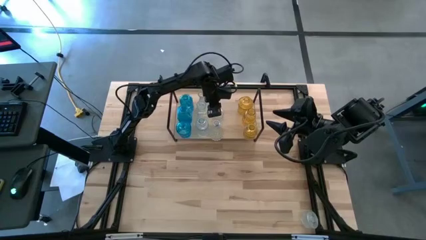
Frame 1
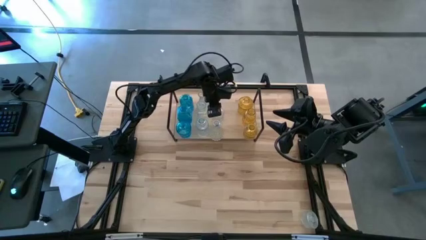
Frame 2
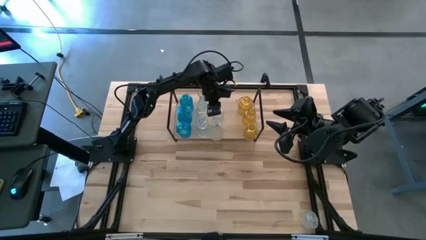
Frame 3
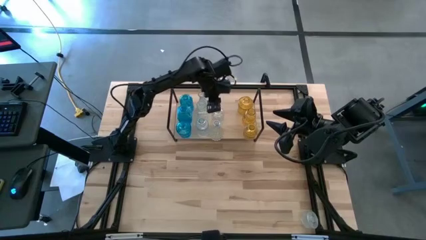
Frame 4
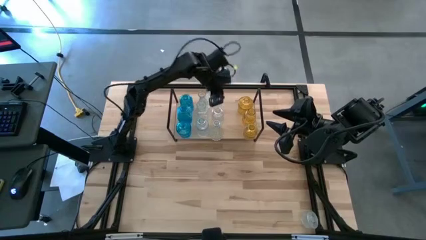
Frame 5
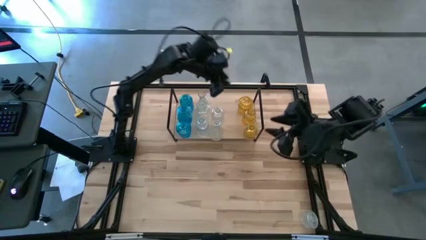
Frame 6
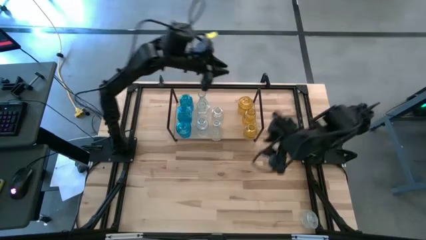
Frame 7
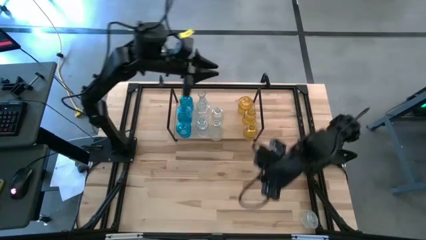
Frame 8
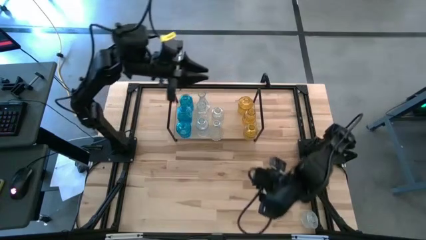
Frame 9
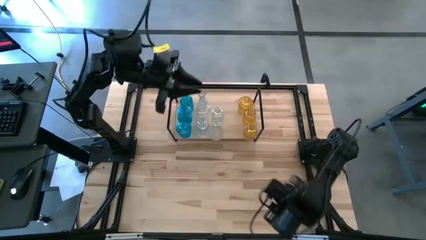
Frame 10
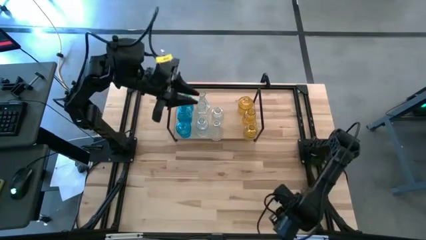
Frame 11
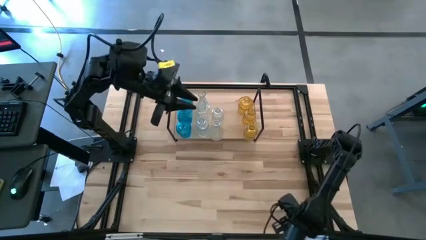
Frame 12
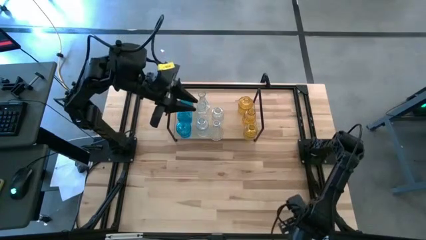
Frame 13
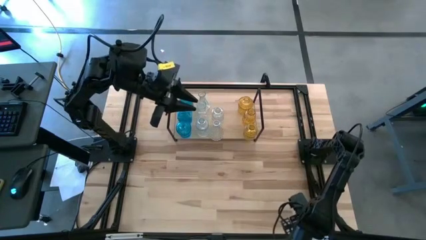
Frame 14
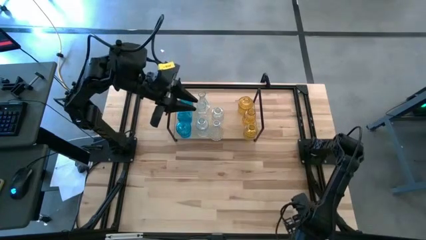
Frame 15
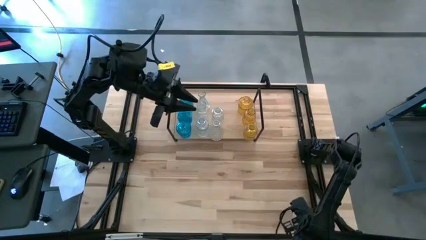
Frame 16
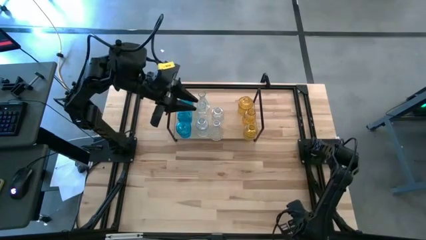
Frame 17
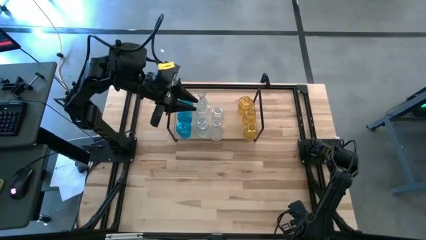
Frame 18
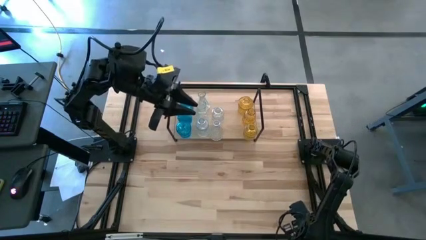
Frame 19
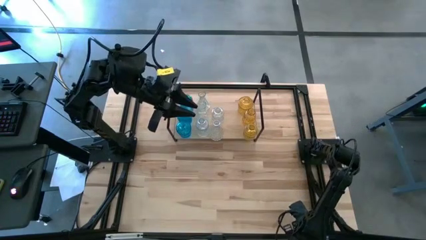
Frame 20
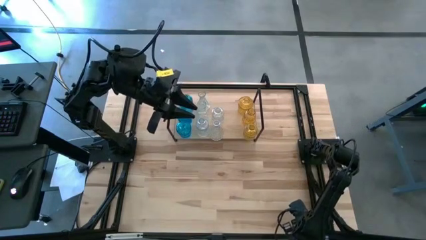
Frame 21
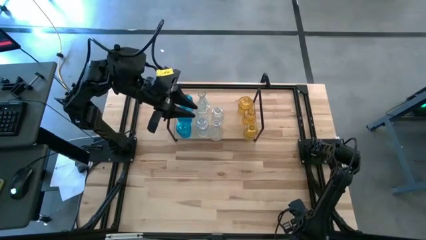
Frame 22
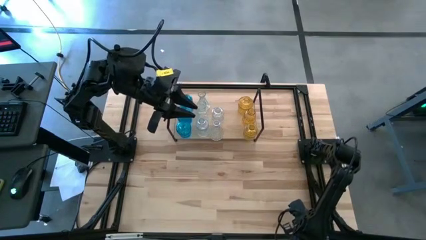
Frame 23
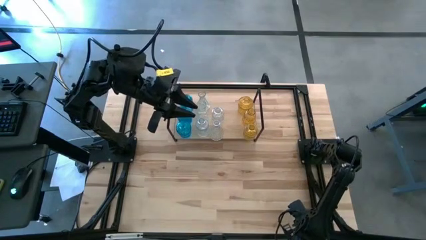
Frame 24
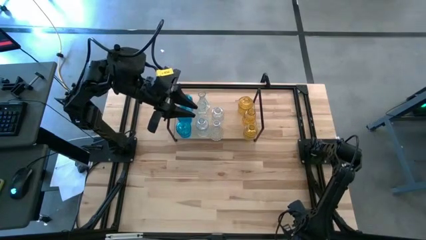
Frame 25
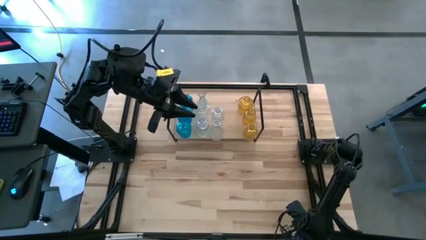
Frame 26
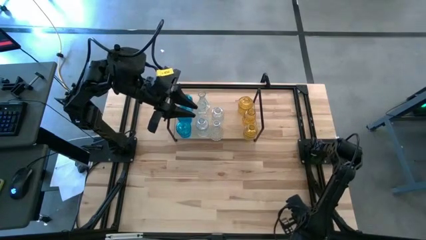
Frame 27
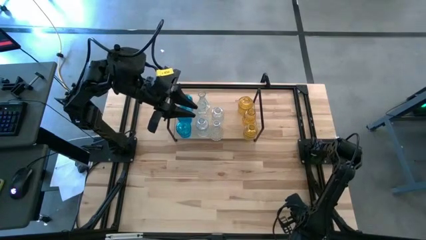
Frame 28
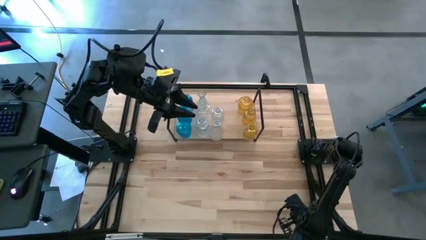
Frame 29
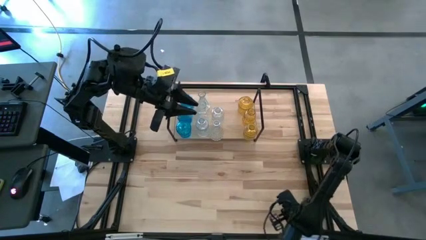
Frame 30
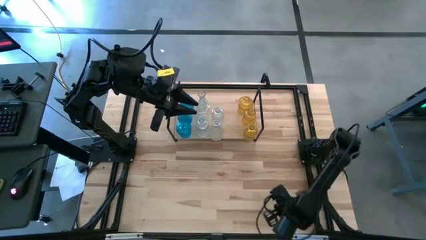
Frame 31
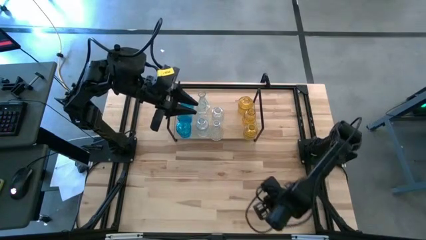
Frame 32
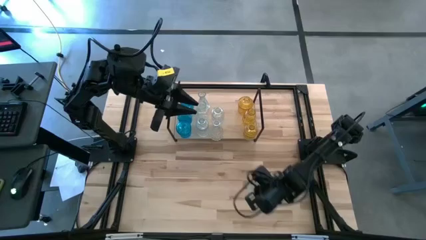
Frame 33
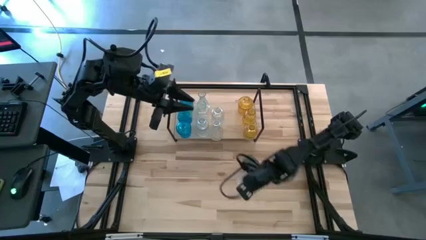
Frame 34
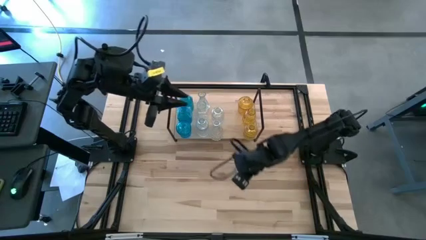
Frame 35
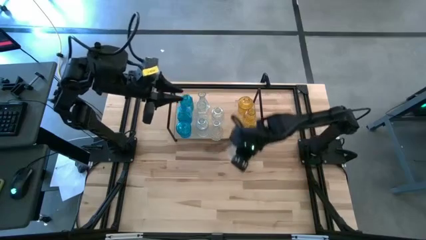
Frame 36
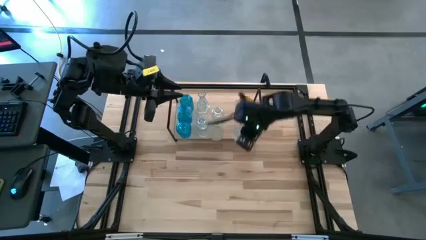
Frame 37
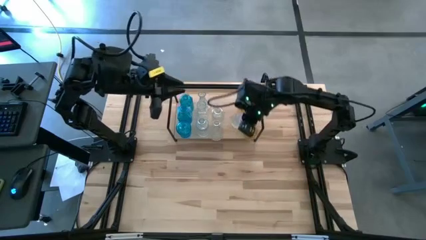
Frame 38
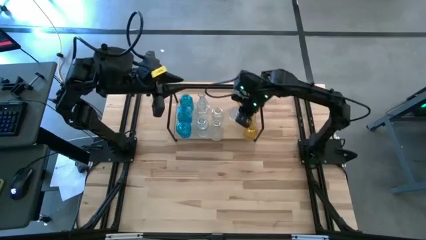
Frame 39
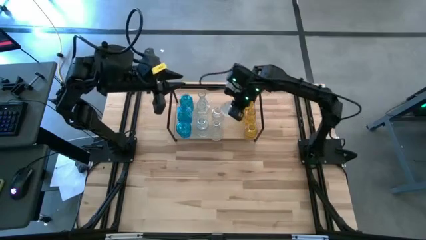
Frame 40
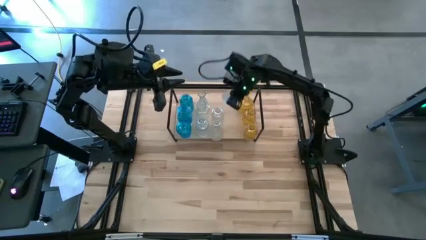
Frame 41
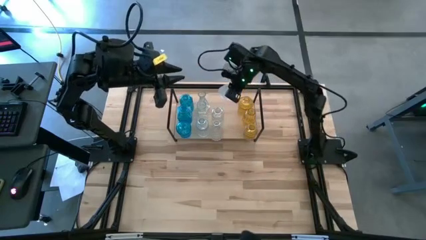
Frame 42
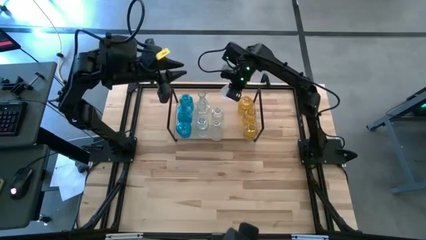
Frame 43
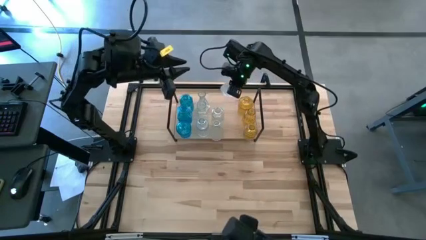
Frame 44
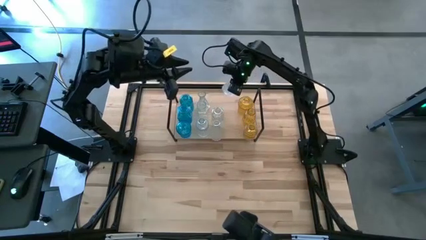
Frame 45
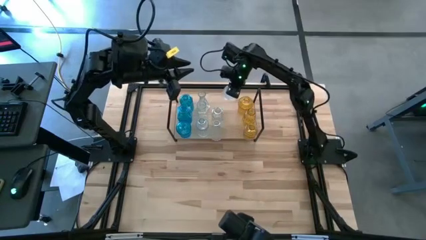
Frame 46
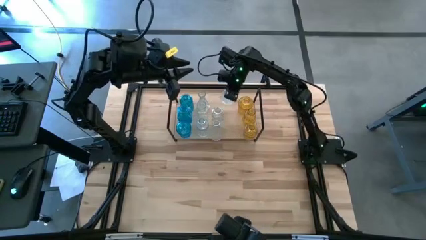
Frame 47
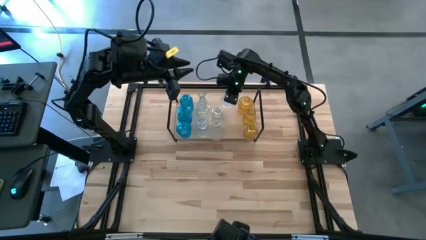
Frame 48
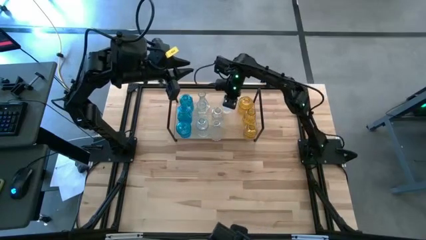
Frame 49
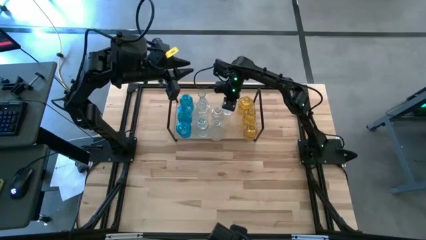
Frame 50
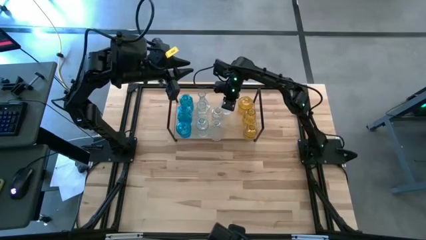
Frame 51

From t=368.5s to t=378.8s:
Task: sort vases onto shelf
Put the transparent vase on the shelf aligned with the other transparent vases

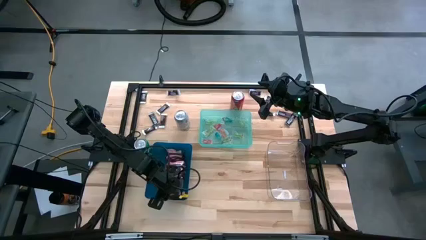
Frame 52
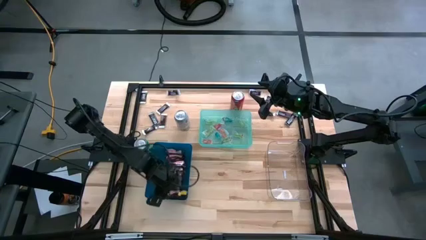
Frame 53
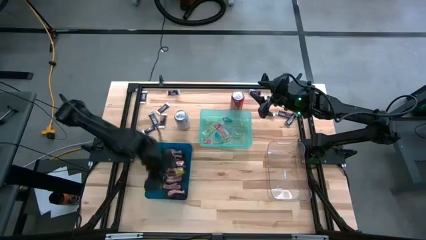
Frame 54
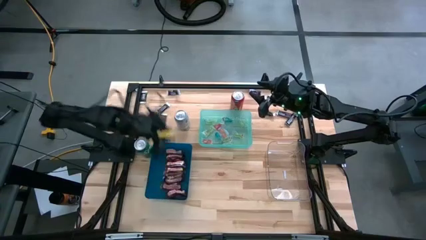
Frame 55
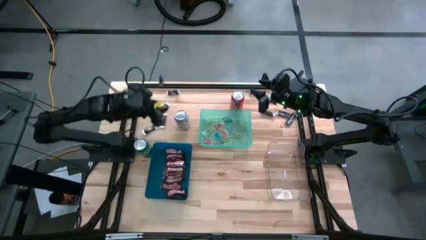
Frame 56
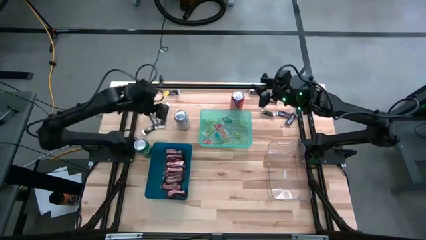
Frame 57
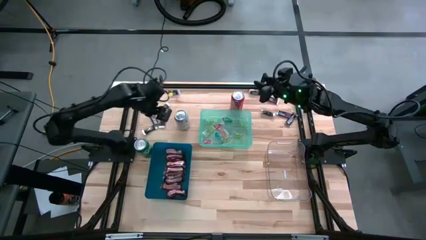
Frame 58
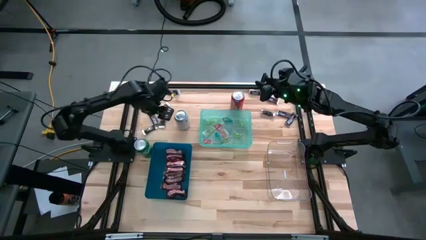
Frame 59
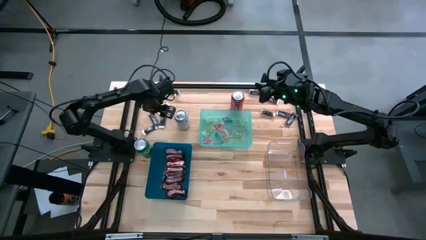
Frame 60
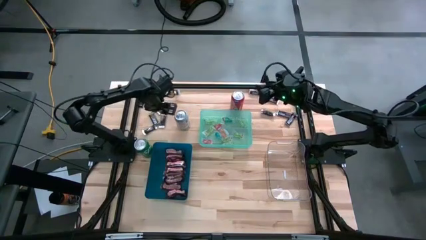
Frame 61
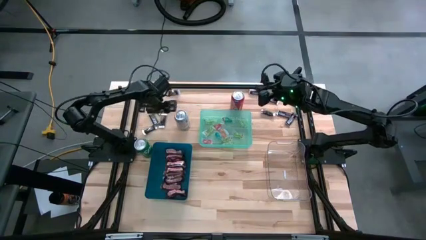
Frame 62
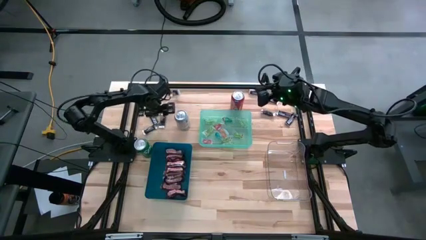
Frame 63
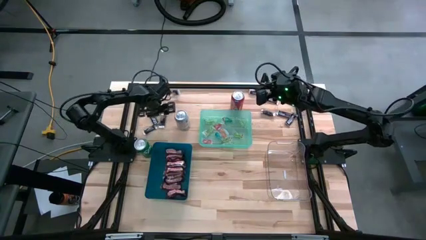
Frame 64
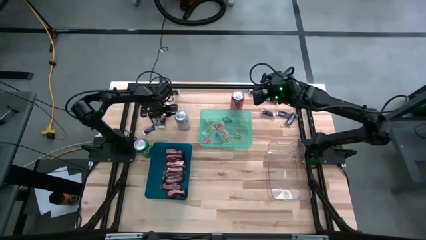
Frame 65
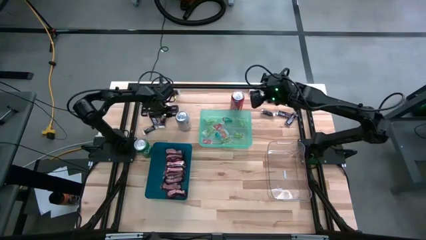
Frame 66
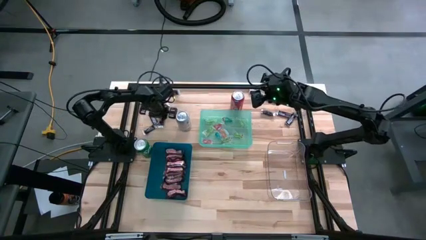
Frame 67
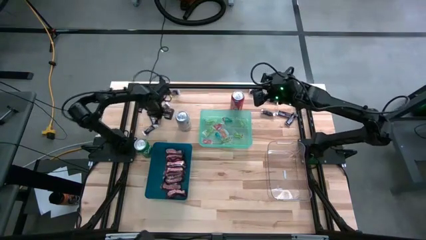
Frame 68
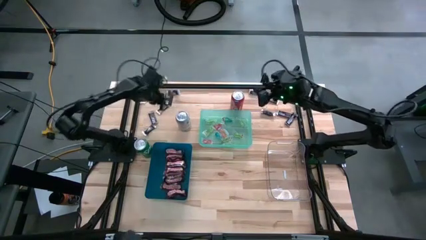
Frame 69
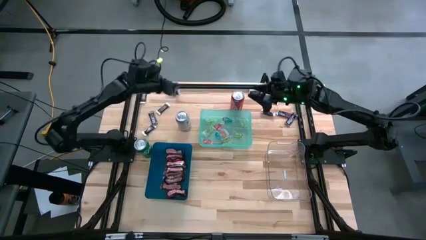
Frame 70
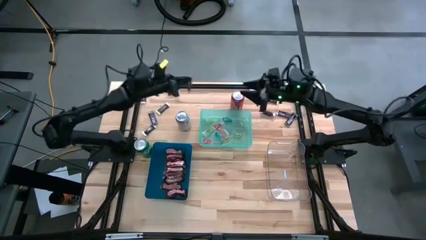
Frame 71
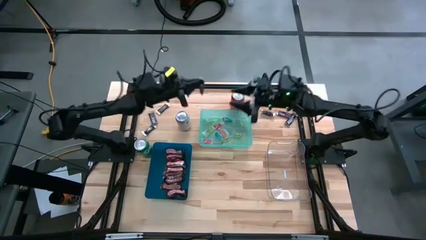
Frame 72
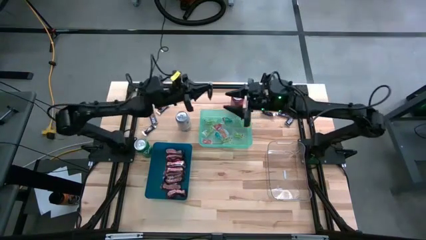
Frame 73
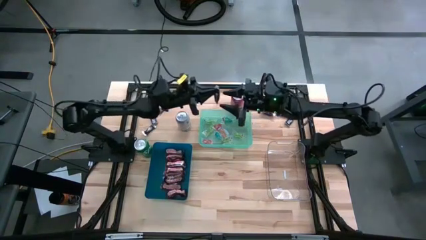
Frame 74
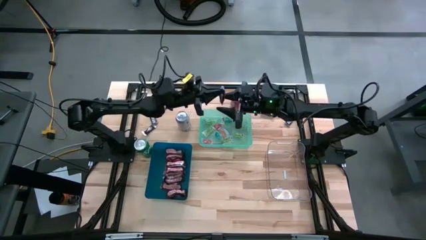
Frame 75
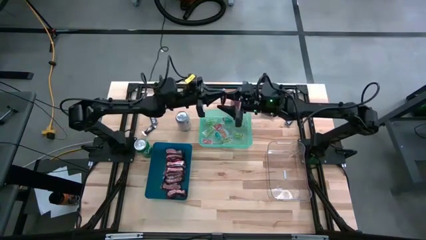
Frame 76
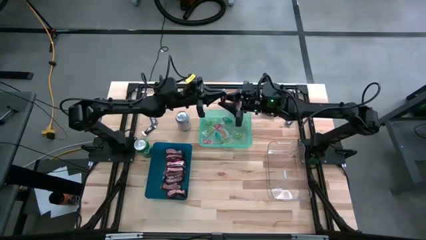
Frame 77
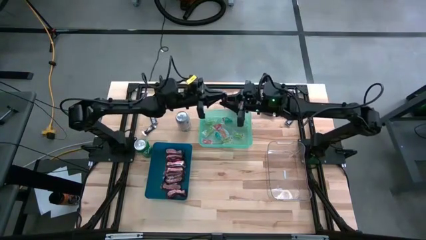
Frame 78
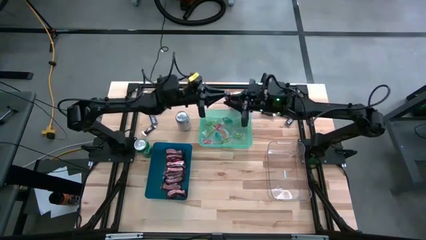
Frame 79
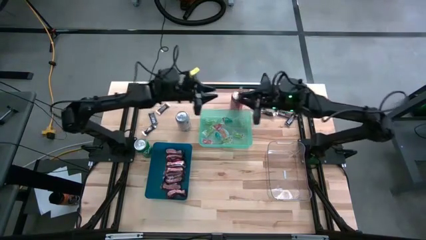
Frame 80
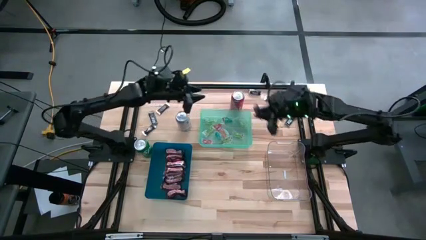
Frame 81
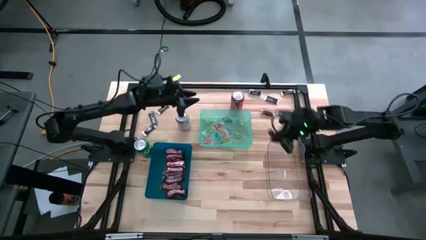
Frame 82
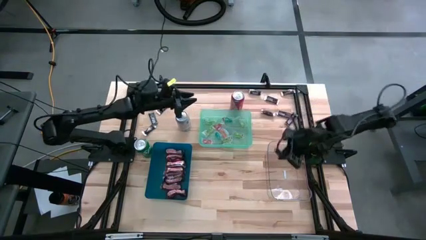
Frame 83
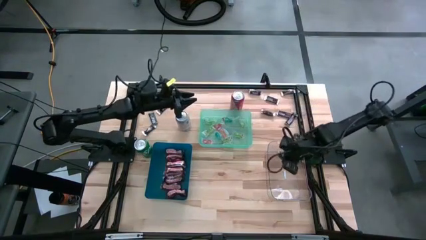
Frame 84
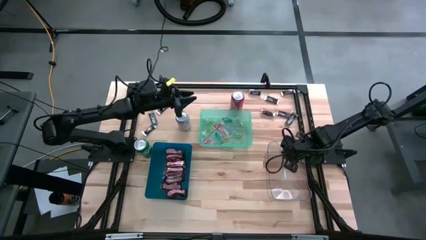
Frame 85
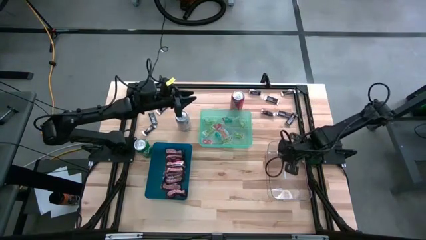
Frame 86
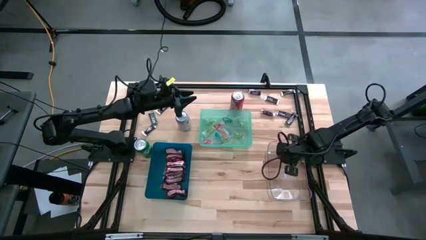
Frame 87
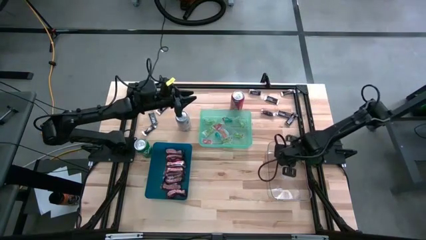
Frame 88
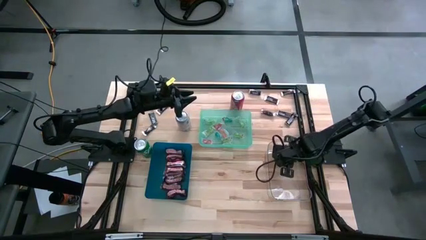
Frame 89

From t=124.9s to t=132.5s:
Task: Organize candy in baskets
Put the white brown chocolate into the transparent bin
